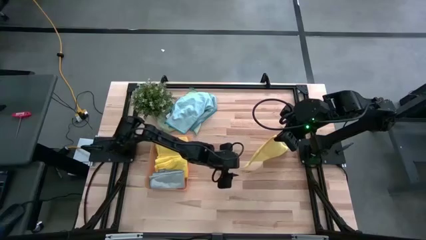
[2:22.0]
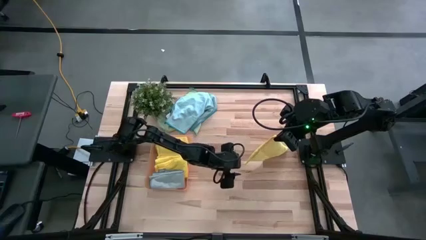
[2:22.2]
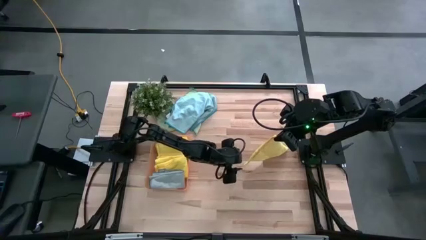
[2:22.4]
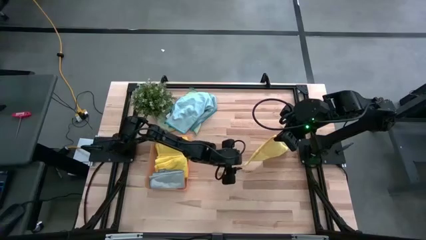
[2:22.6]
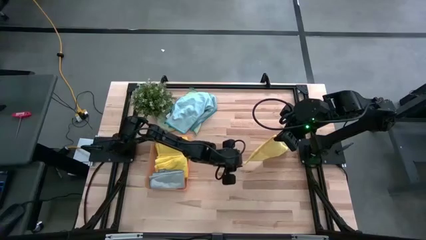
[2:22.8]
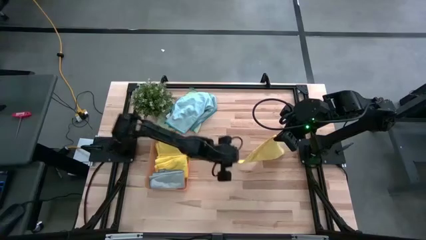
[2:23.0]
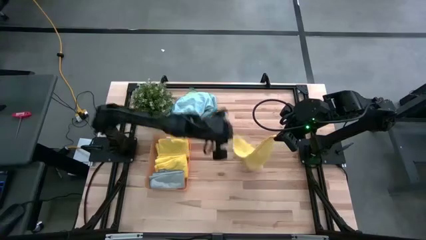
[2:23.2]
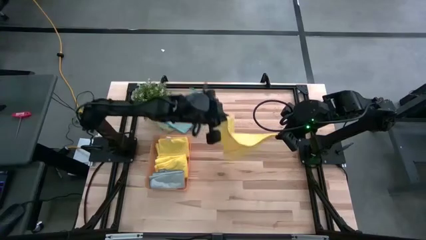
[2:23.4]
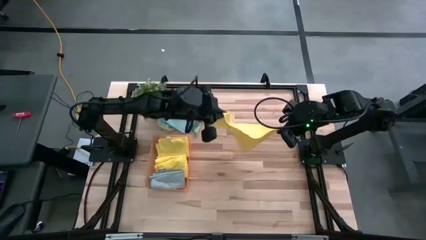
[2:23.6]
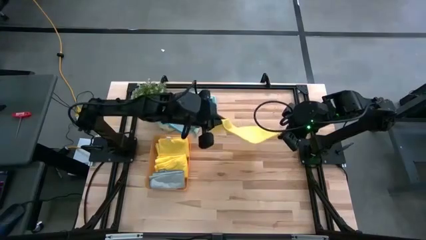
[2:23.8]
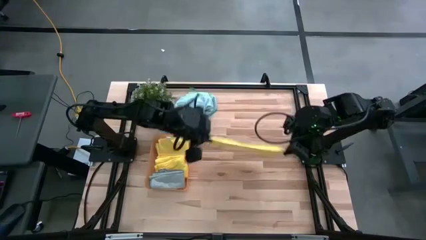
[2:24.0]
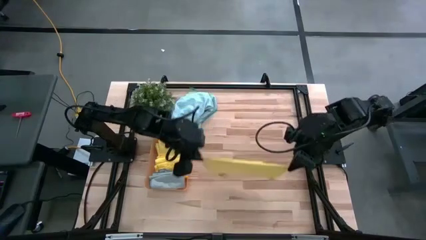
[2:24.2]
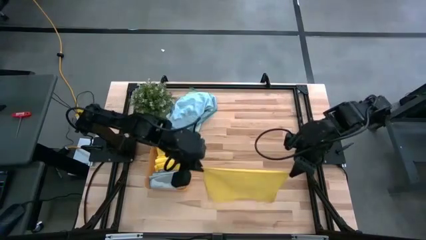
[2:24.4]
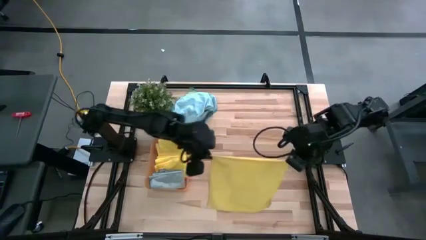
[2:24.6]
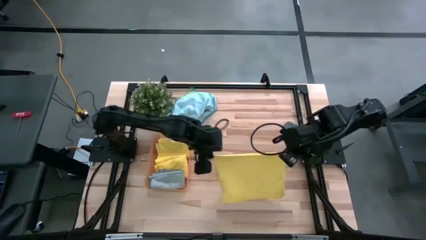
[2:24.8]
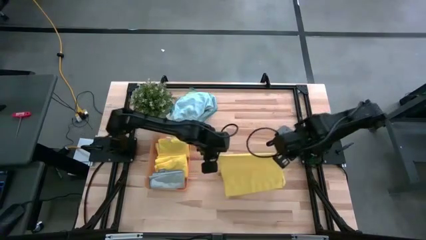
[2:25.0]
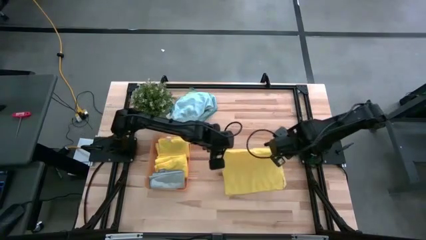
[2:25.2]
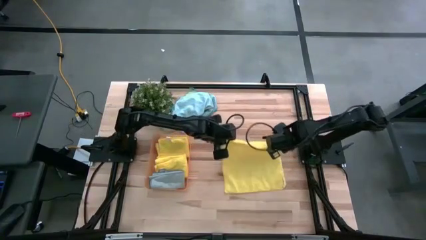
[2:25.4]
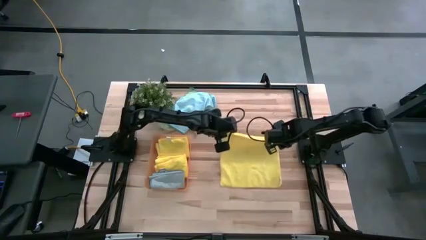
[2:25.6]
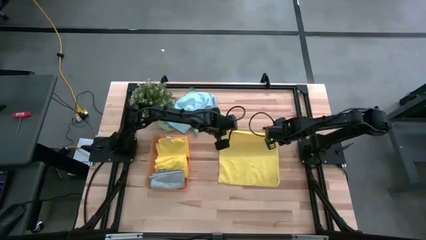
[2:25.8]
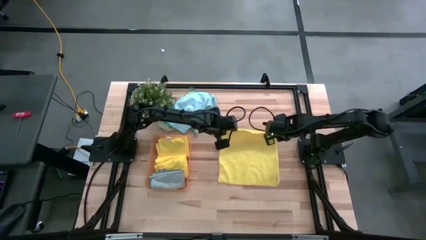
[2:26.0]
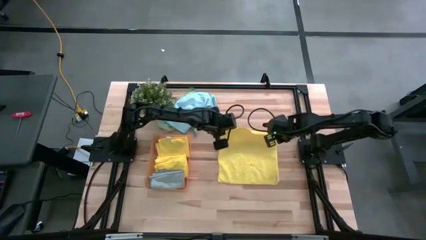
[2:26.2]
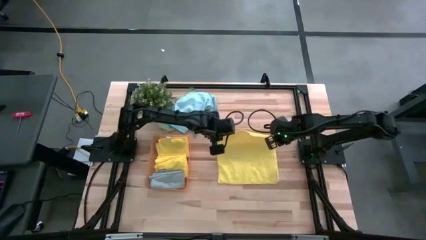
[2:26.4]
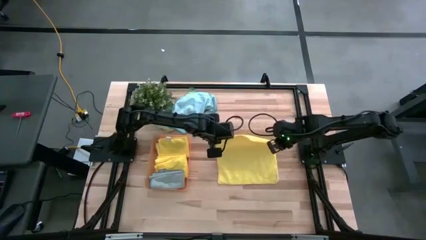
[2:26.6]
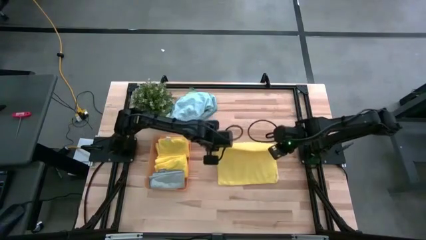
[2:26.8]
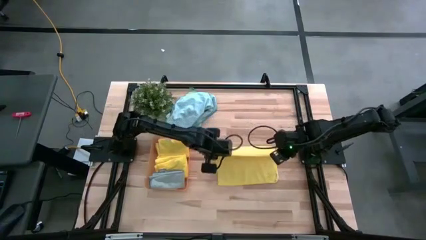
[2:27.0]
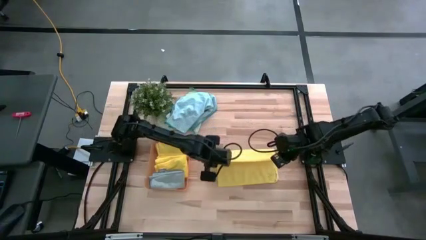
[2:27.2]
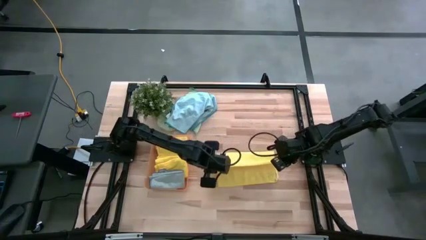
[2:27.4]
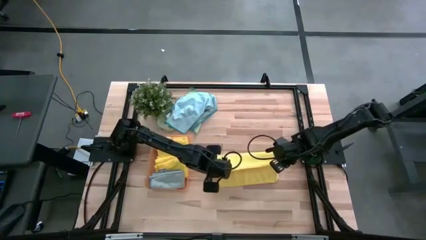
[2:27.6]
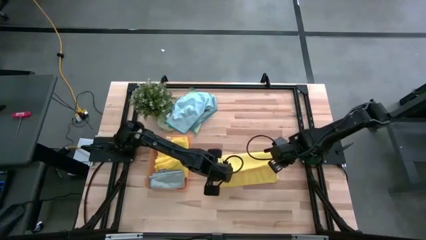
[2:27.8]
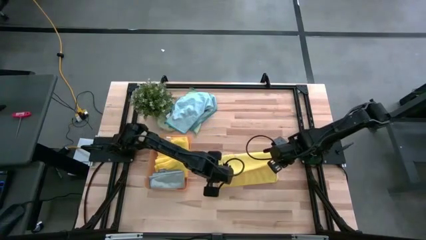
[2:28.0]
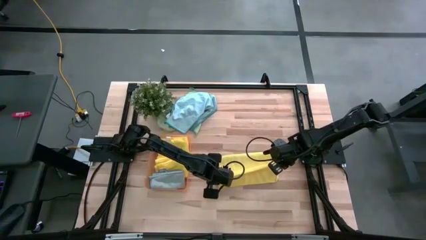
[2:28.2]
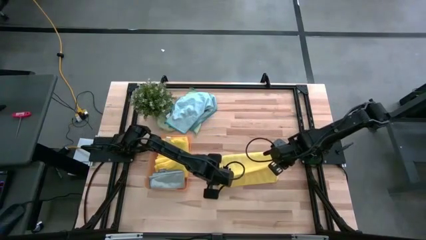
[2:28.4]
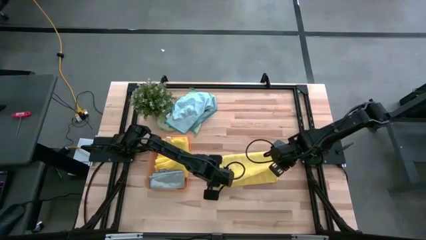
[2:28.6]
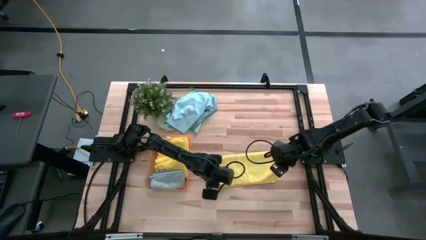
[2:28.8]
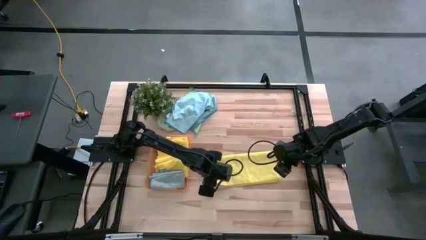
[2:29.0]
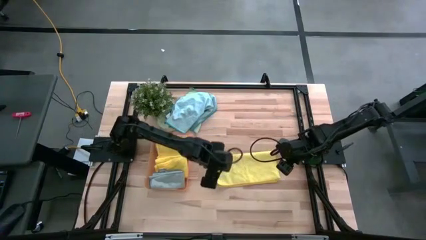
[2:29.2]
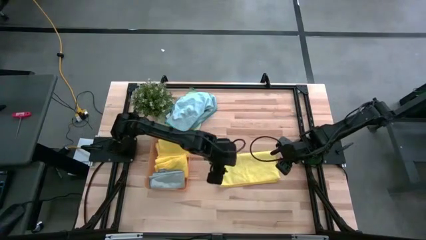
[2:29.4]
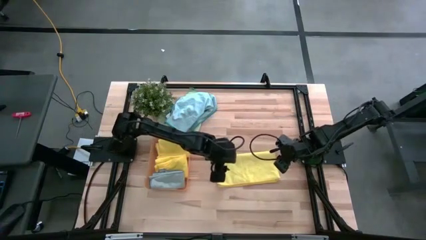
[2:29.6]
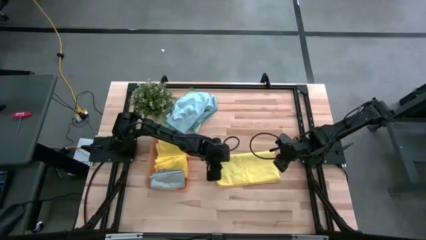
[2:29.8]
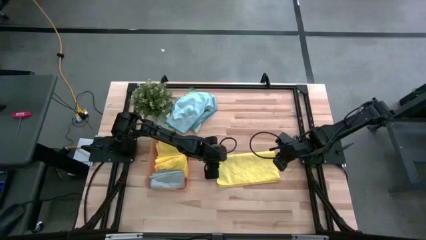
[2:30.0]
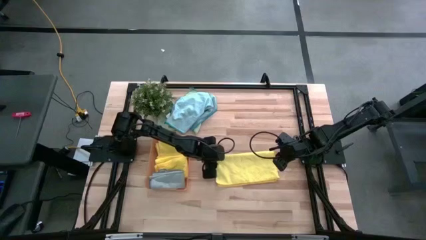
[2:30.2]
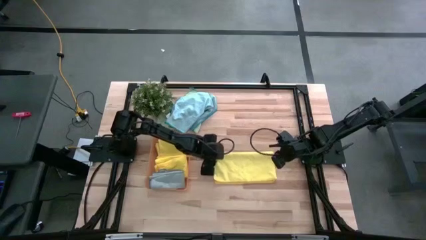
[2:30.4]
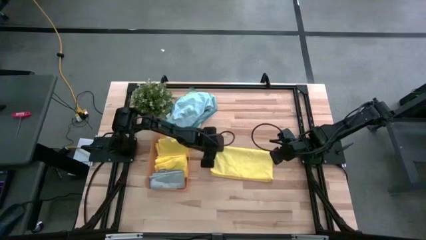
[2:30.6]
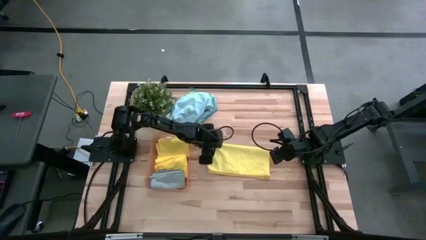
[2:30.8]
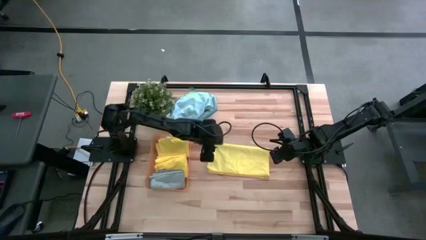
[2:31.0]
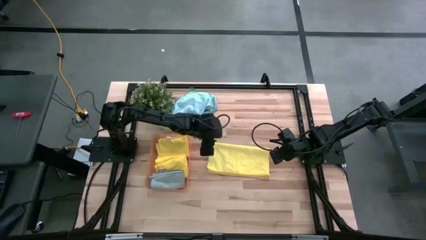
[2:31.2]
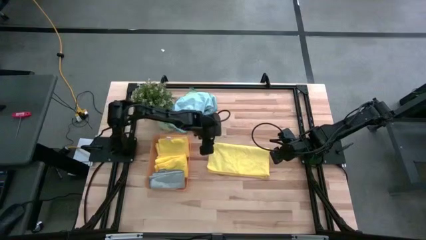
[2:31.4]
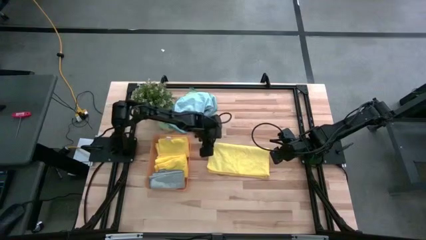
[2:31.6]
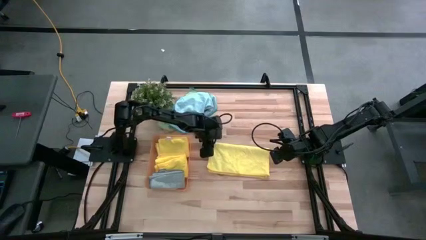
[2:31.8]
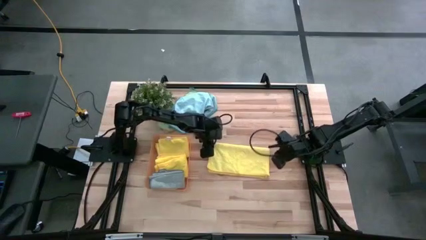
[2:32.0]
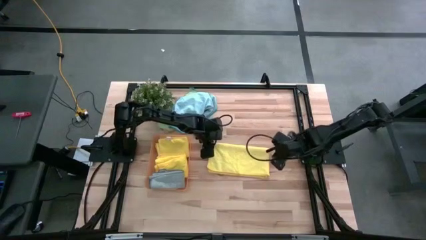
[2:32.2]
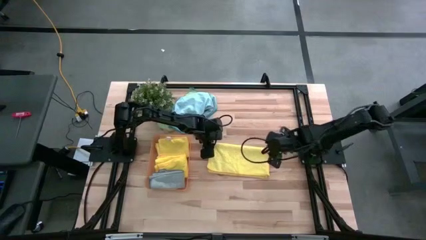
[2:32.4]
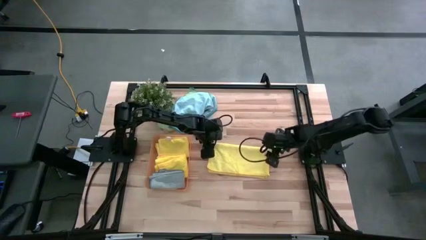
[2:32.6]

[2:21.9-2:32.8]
Task: Fold microfiber towels
Fold the yellow microfiber towel
